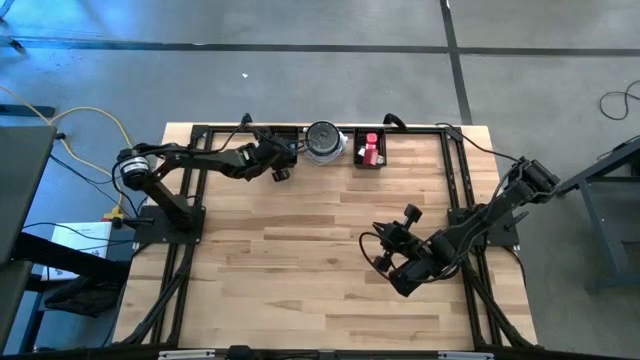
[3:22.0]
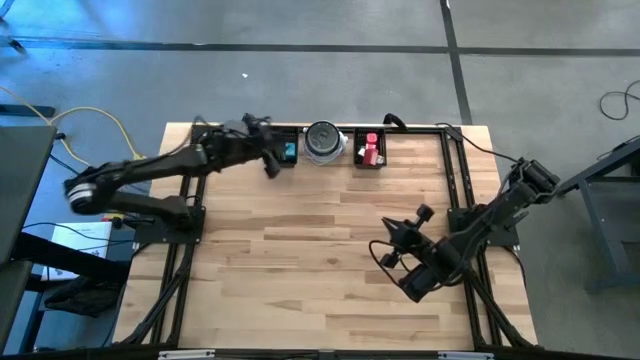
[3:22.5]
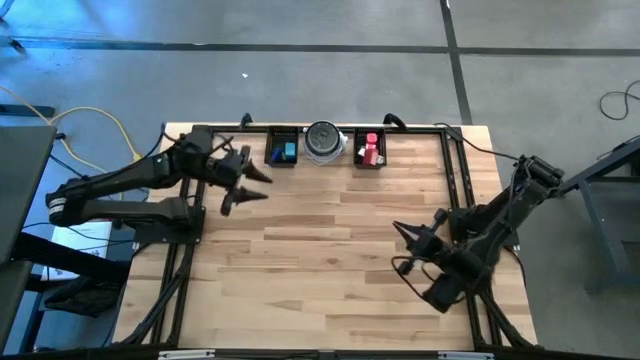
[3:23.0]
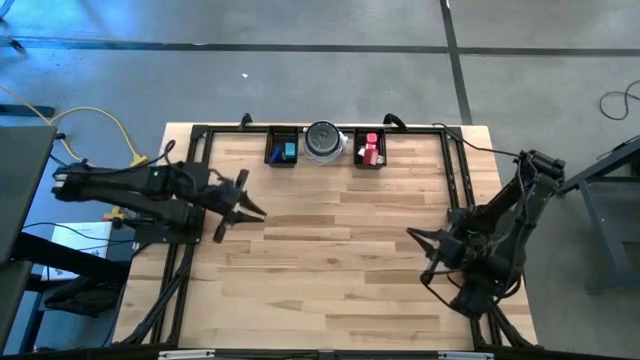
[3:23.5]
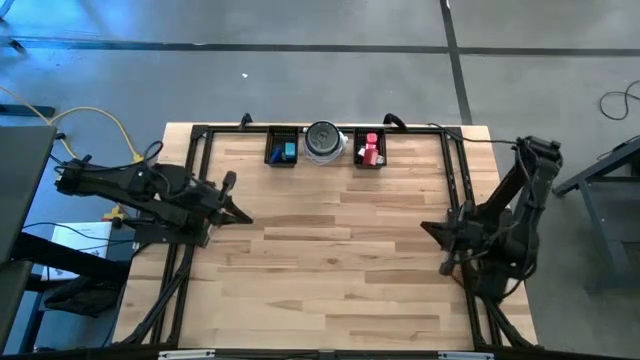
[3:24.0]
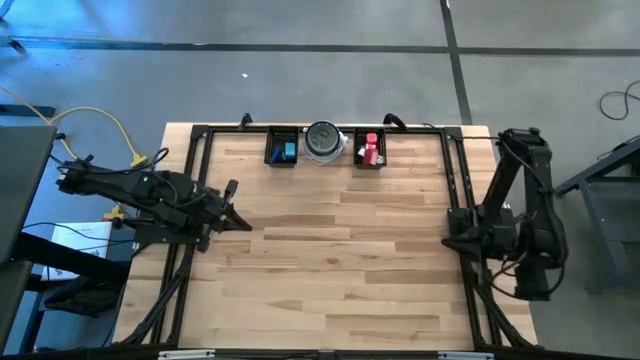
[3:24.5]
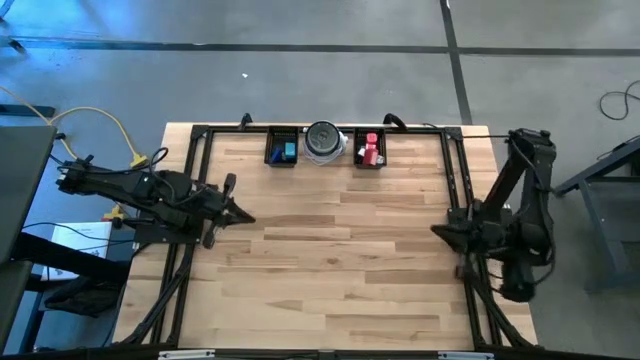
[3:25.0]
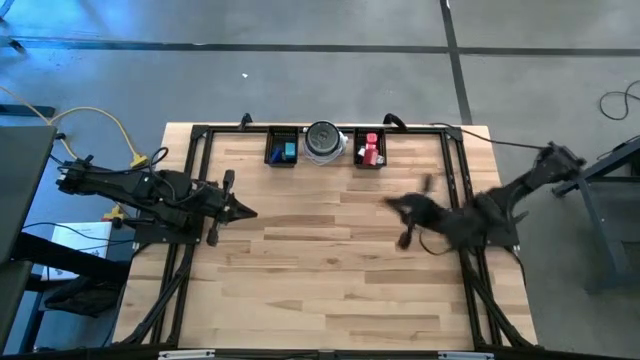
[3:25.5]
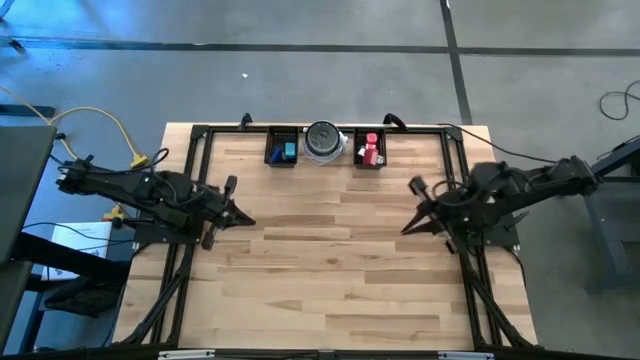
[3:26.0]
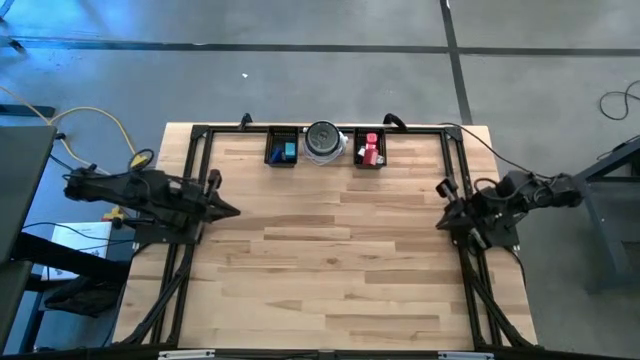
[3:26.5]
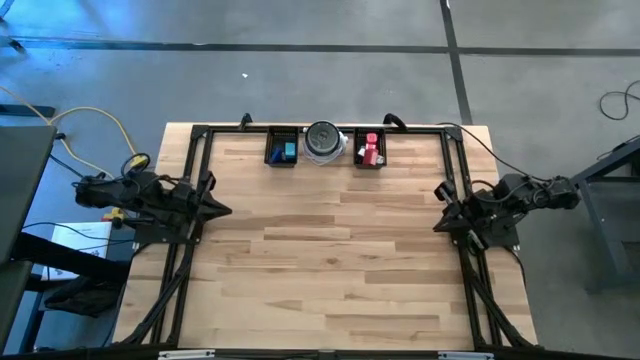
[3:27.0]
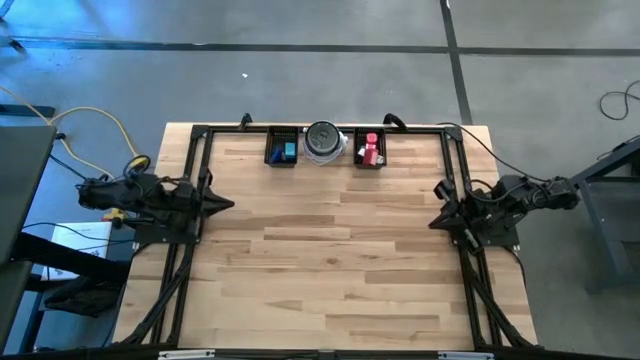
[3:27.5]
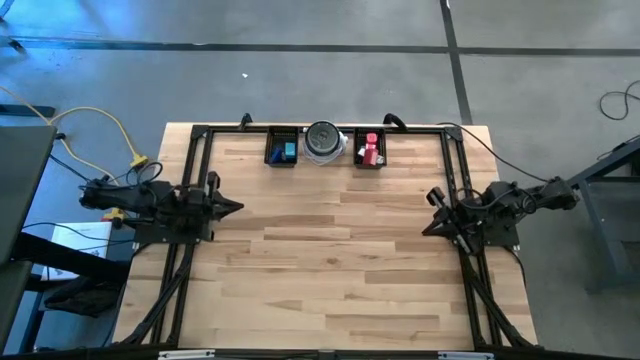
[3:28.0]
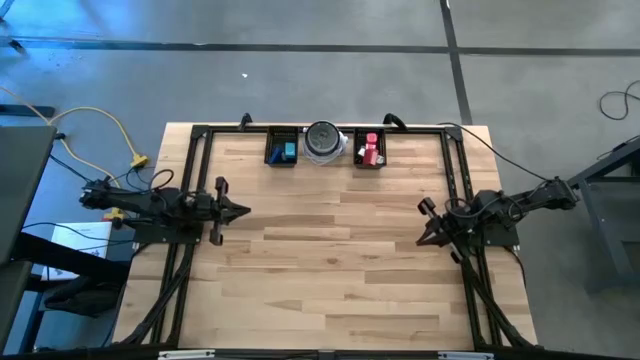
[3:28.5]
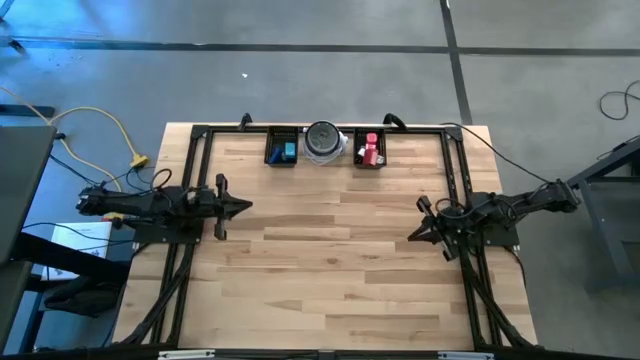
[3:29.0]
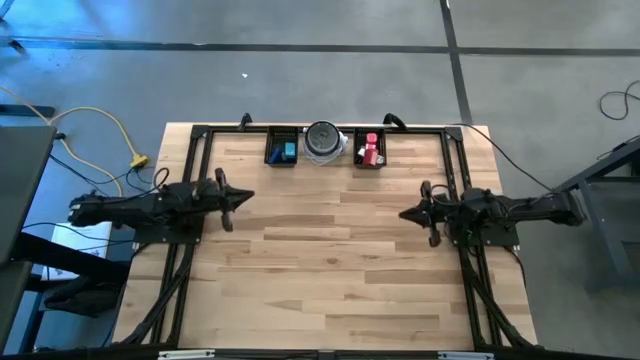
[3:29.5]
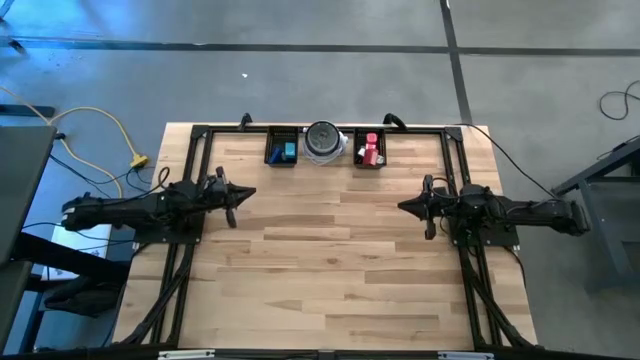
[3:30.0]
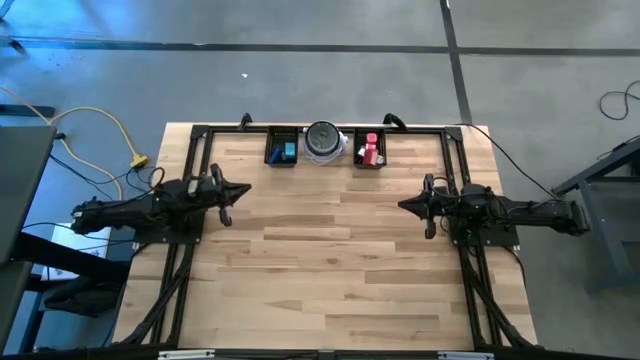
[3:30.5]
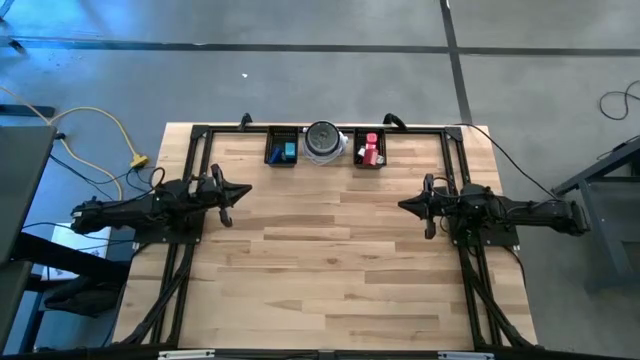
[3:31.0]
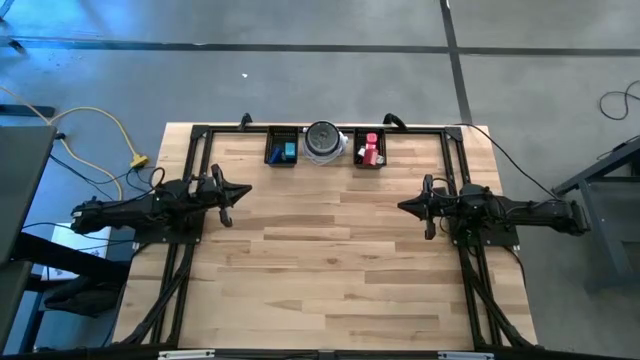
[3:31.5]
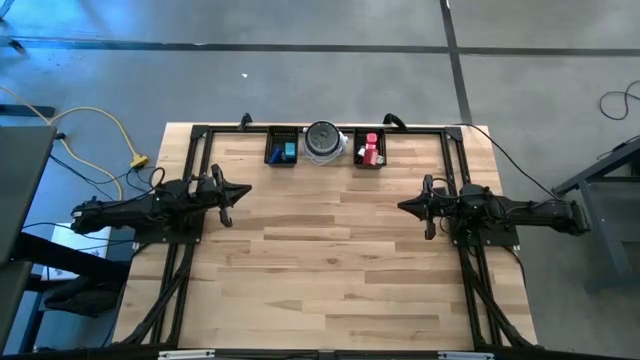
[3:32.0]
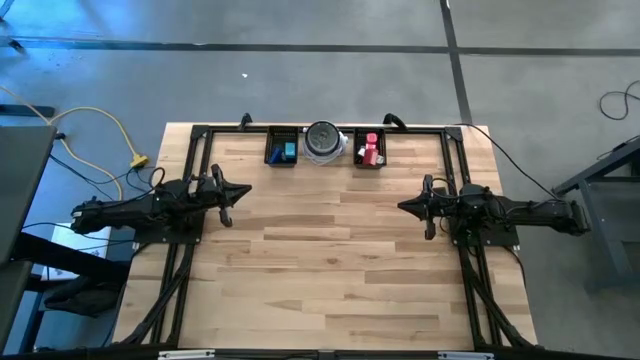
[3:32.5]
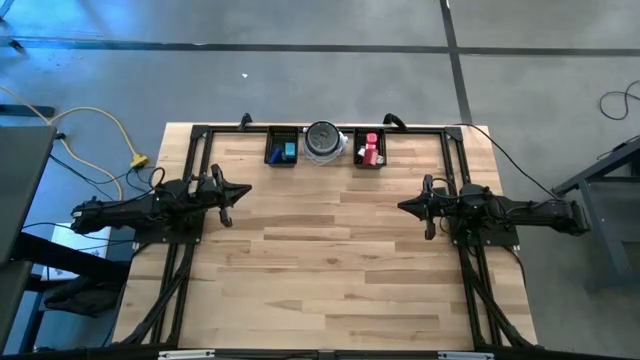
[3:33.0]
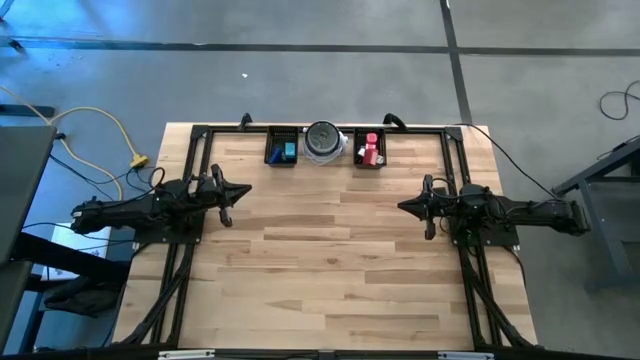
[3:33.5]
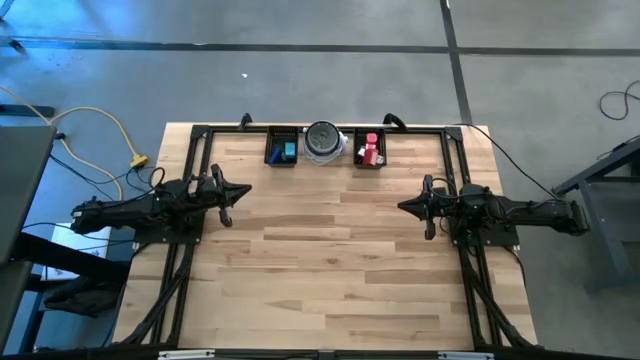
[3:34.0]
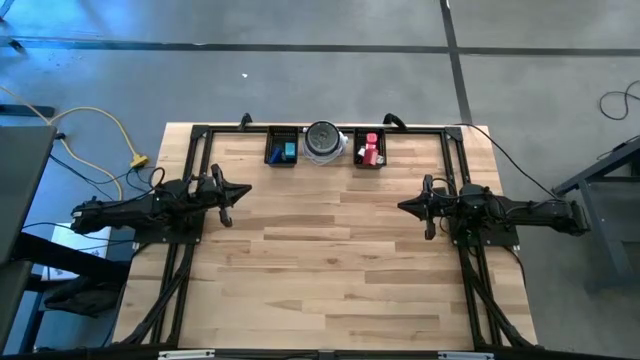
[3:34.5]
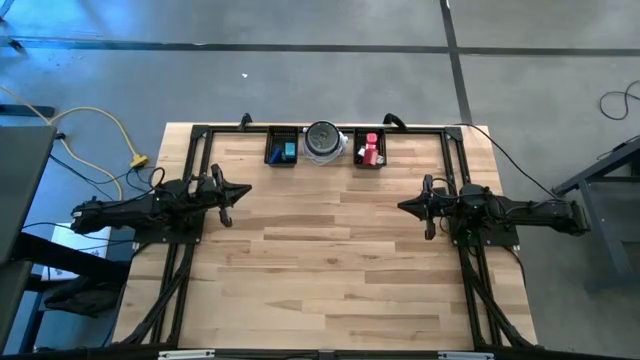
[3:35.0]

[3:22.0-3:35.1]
Task: Pick & Place Office items
Return to Home Position

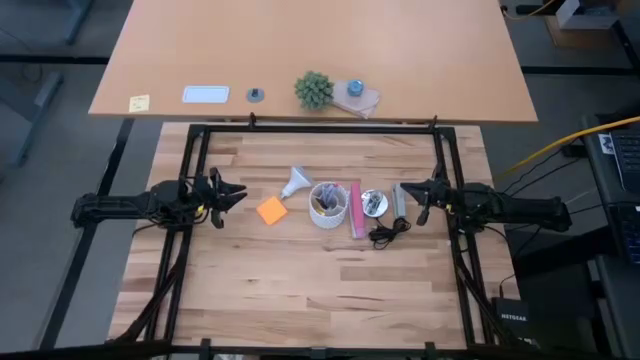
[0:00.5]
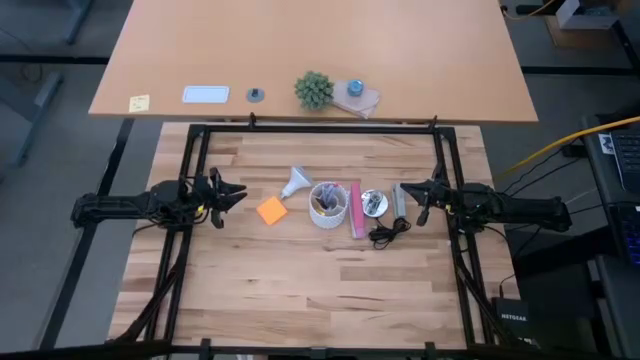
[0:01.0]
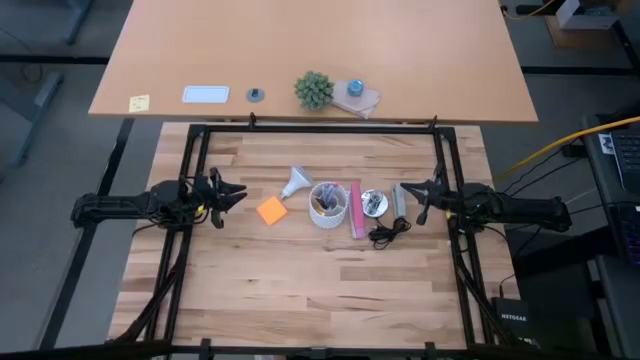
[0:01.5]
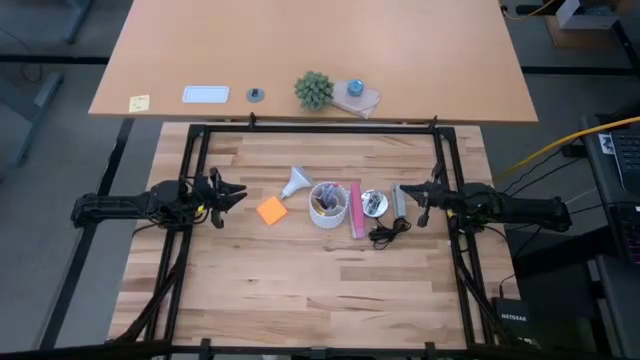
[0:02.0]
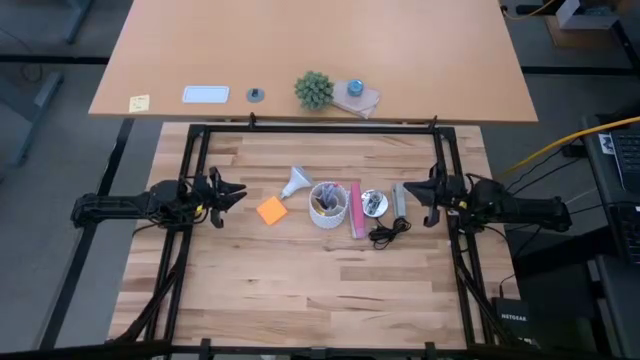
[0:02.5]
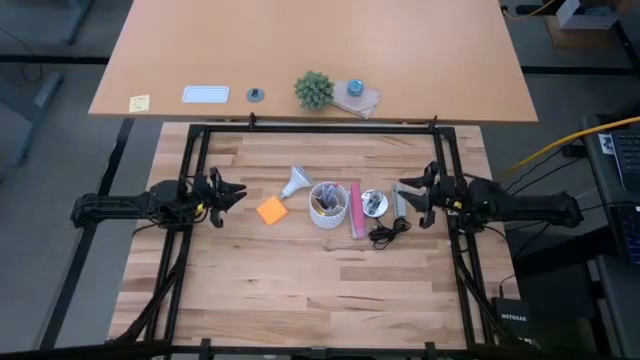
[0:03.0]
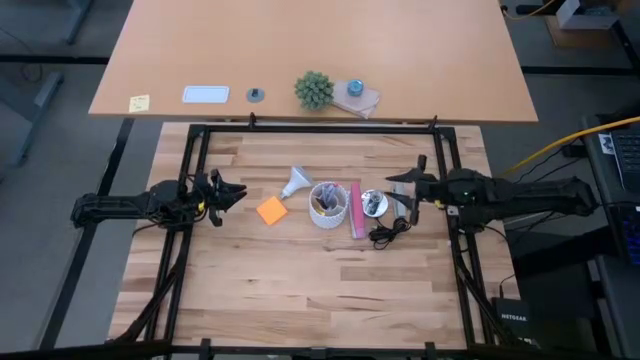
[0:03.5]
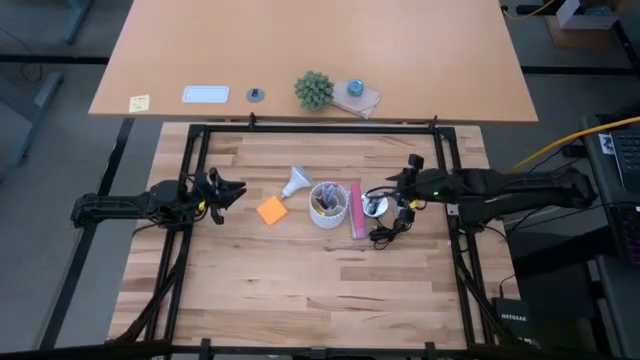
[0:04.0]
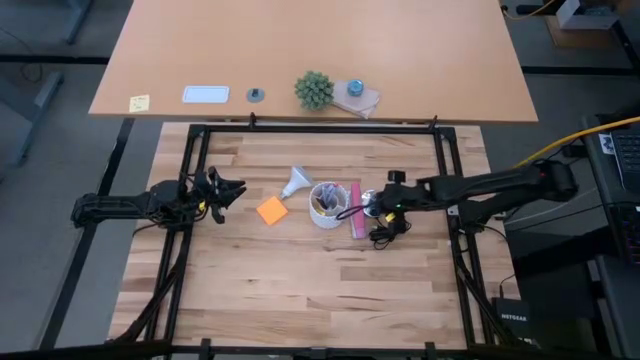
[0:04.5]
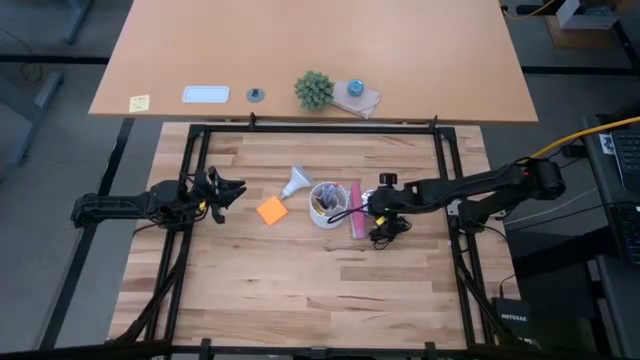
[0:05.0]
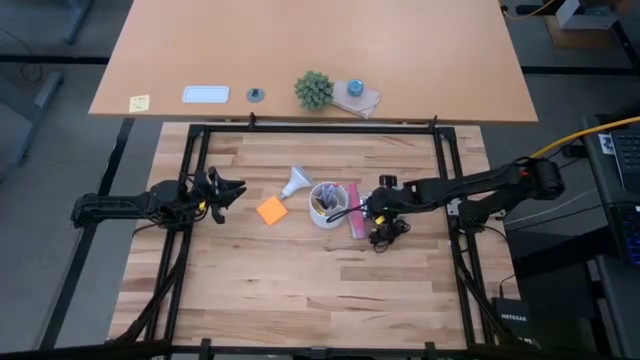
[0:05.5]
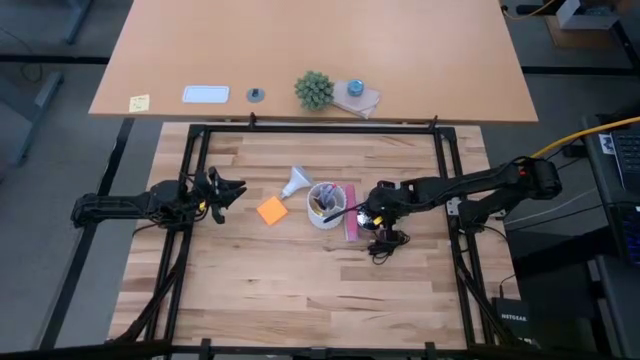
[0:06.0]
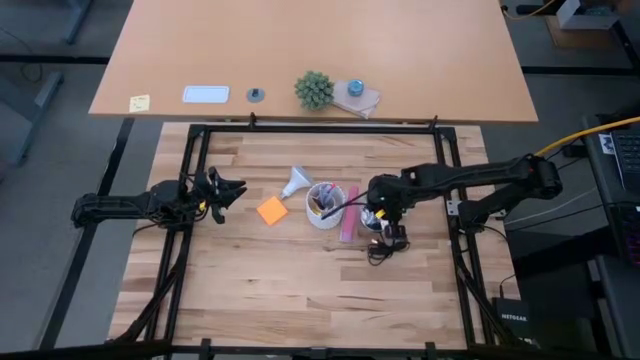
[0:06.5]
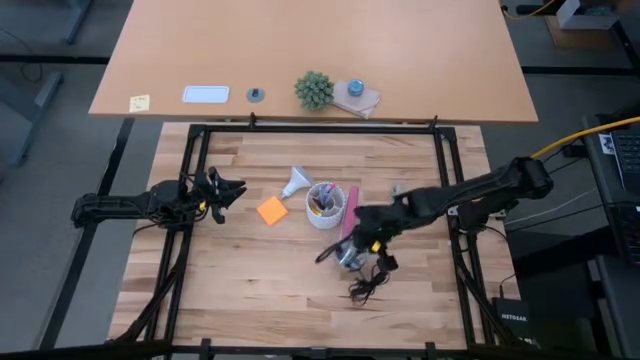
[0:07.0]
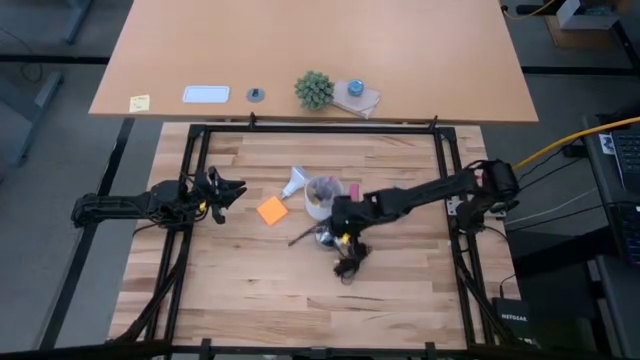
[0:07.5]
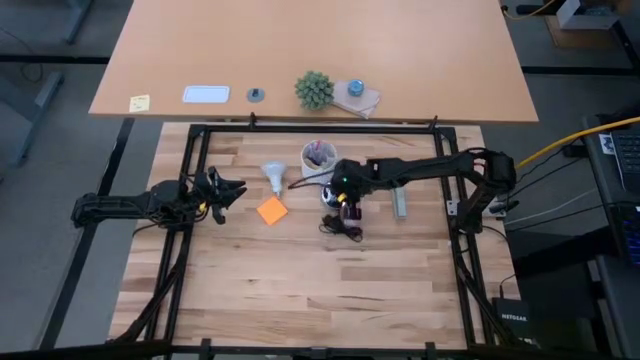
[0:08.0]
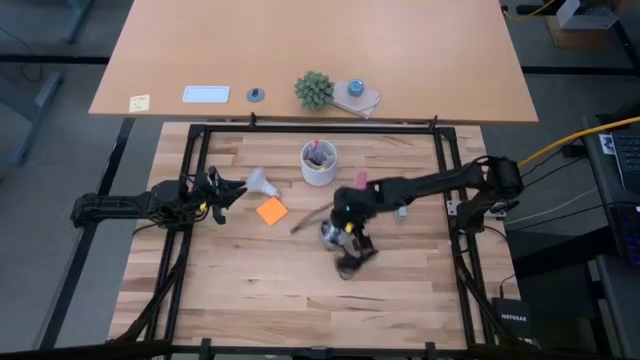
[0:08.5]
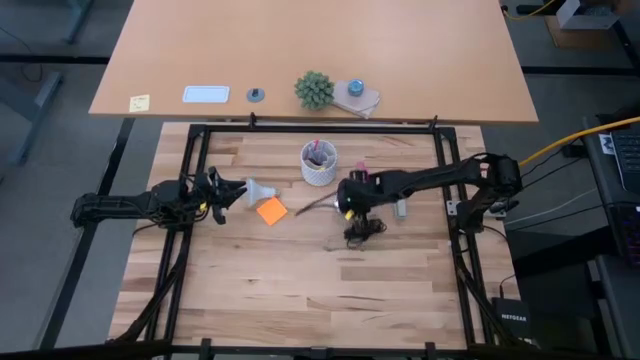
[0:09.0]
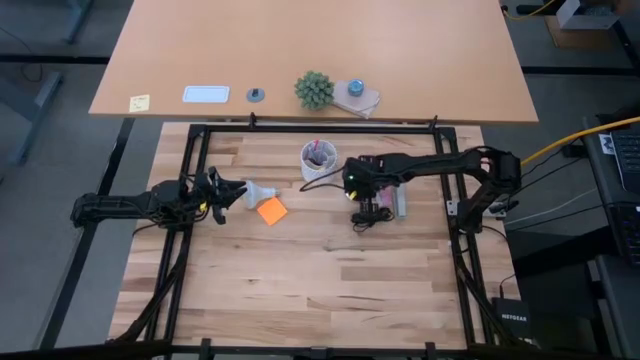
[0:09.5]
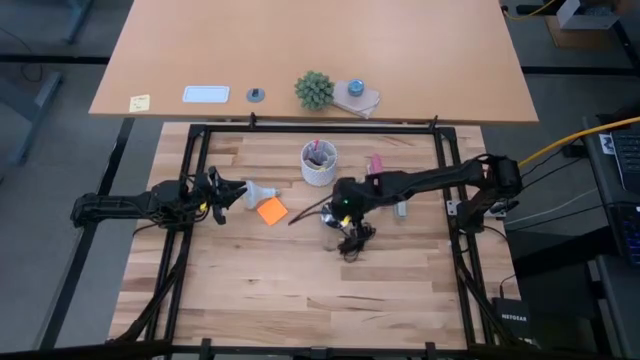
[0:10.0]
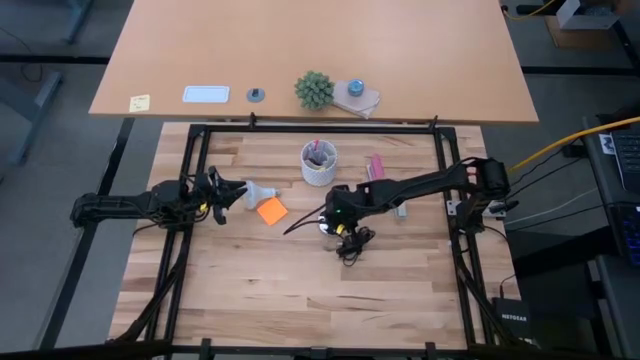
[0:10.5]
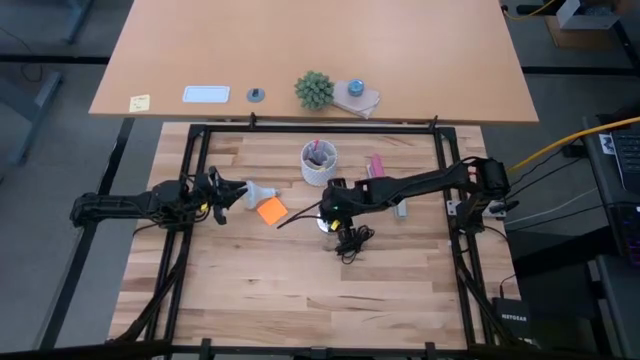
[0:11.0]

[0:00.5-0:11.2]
Task: Screw lightbulb
Move the lamp to the center of the table
